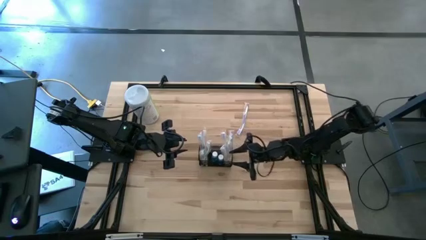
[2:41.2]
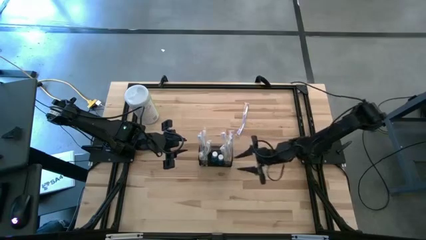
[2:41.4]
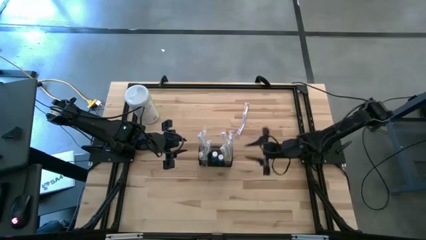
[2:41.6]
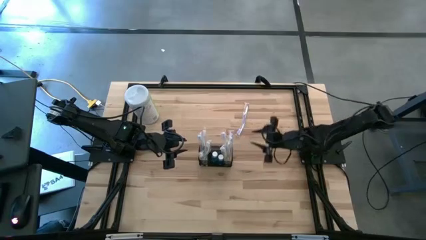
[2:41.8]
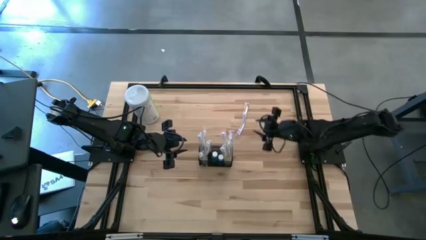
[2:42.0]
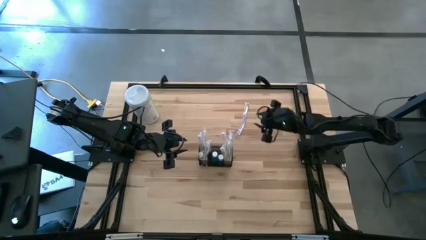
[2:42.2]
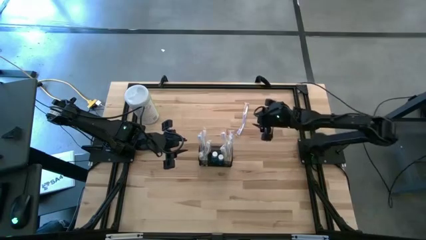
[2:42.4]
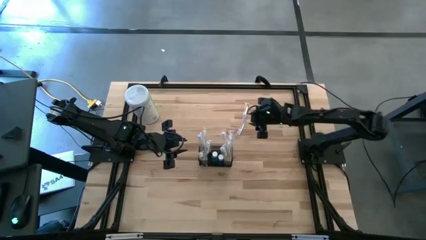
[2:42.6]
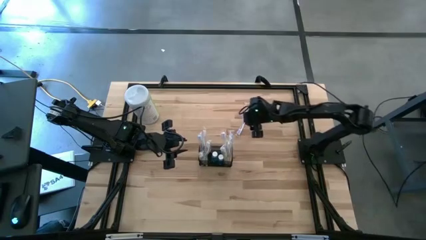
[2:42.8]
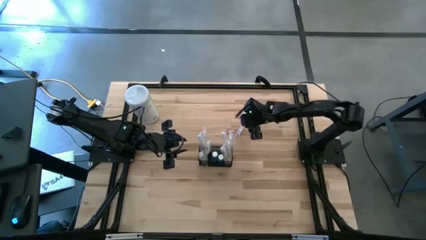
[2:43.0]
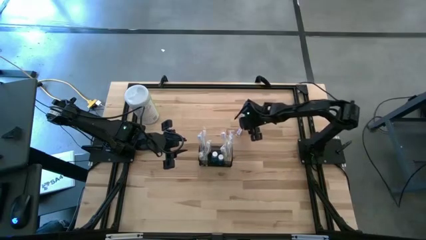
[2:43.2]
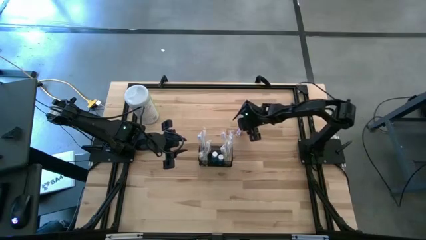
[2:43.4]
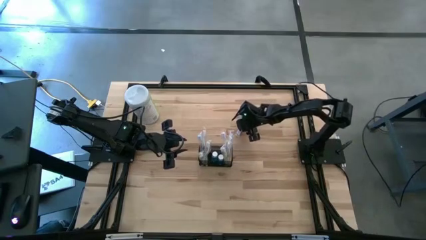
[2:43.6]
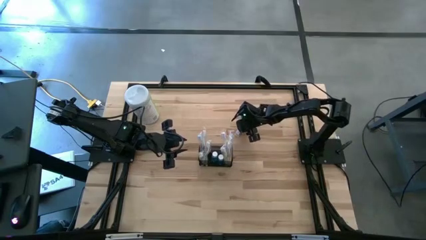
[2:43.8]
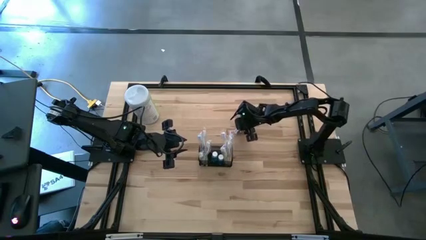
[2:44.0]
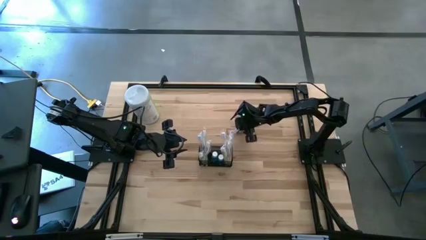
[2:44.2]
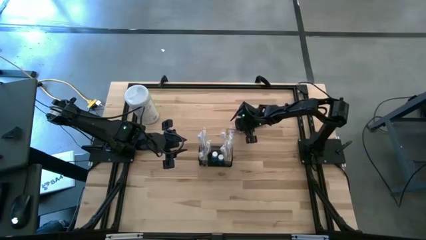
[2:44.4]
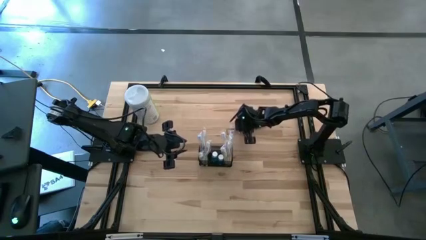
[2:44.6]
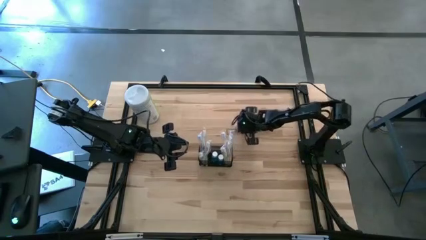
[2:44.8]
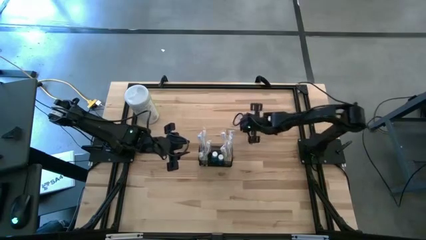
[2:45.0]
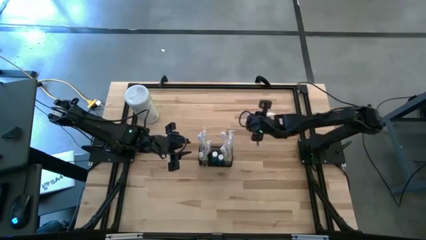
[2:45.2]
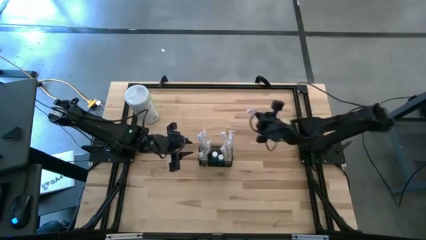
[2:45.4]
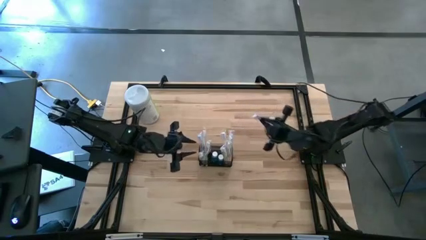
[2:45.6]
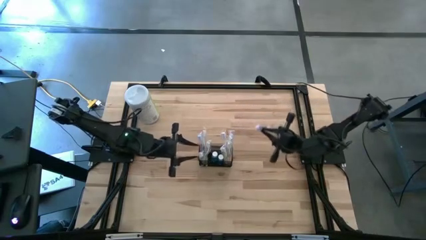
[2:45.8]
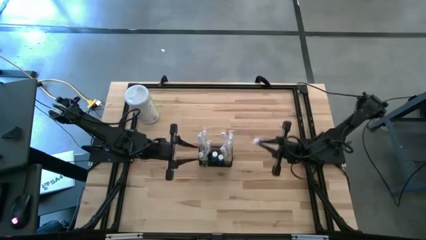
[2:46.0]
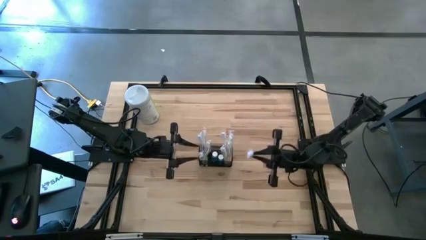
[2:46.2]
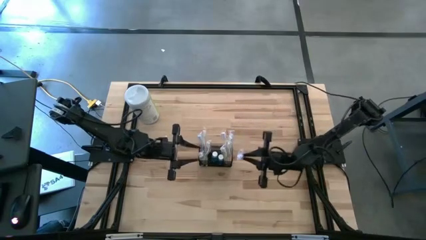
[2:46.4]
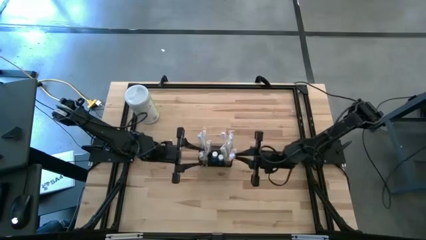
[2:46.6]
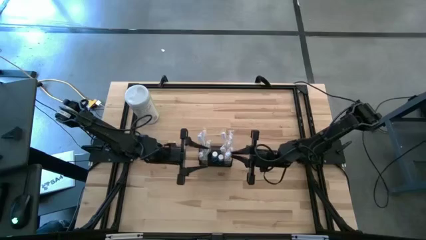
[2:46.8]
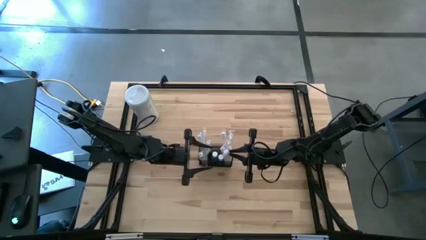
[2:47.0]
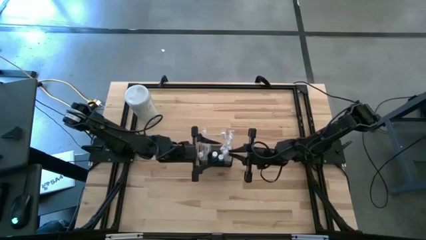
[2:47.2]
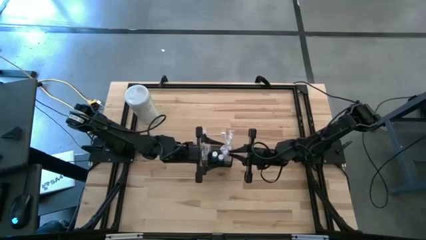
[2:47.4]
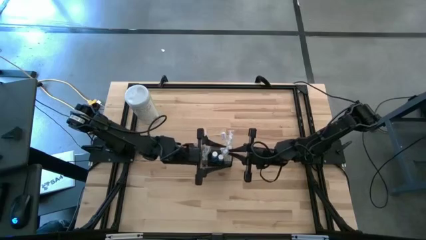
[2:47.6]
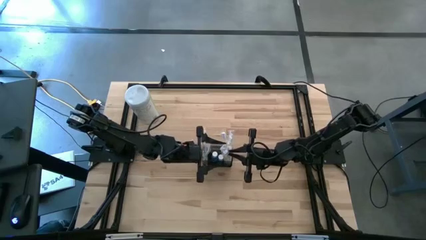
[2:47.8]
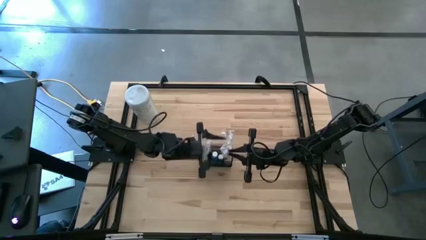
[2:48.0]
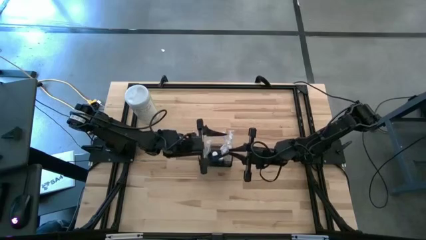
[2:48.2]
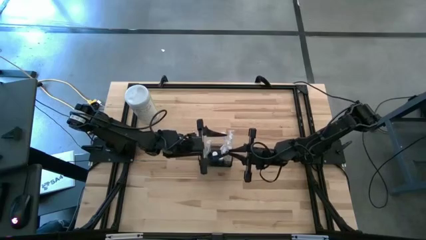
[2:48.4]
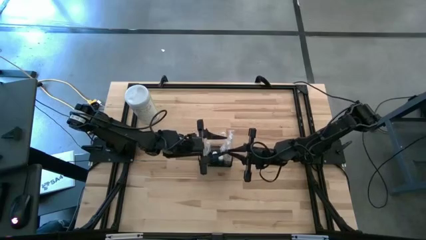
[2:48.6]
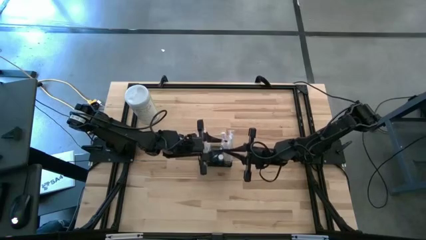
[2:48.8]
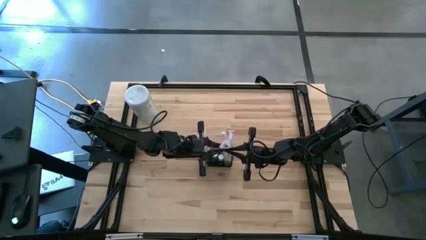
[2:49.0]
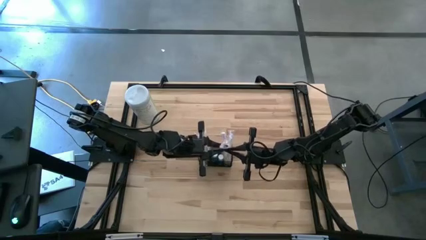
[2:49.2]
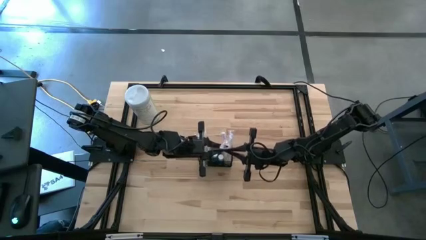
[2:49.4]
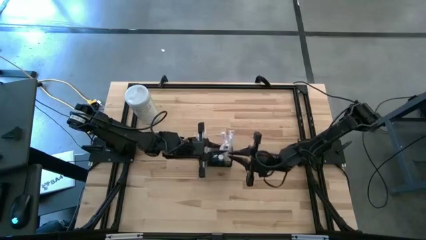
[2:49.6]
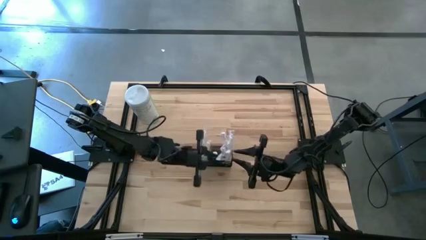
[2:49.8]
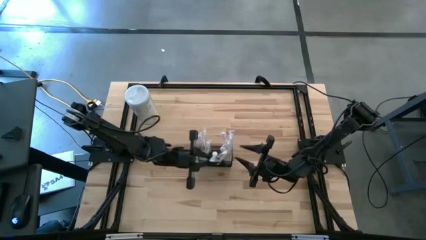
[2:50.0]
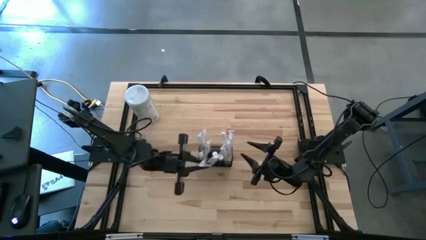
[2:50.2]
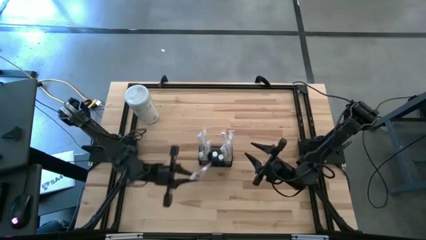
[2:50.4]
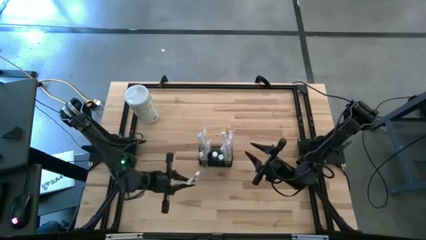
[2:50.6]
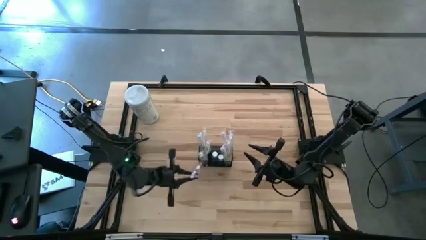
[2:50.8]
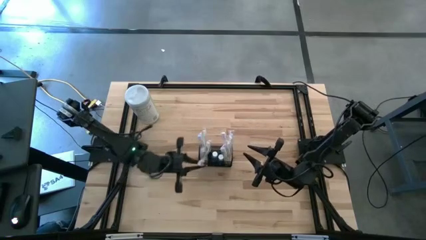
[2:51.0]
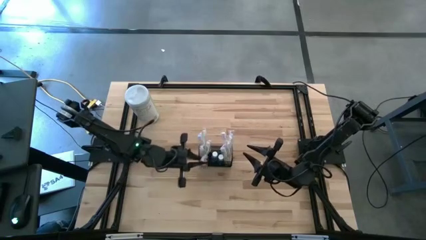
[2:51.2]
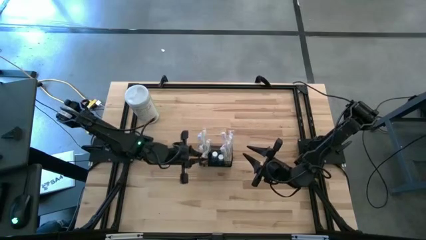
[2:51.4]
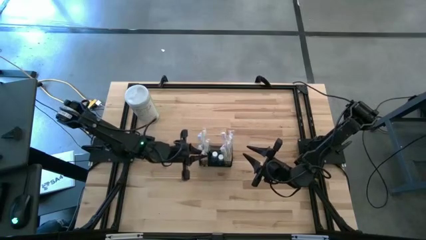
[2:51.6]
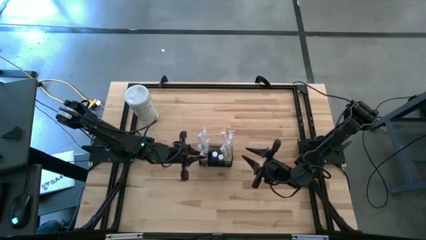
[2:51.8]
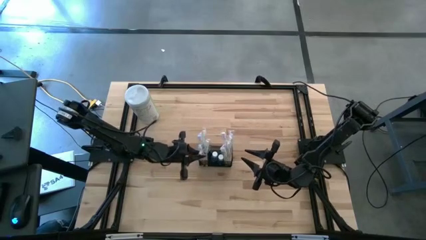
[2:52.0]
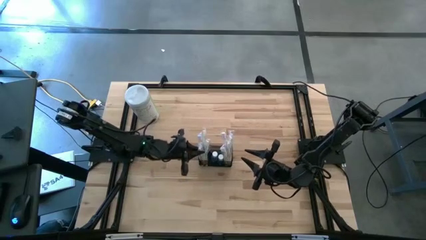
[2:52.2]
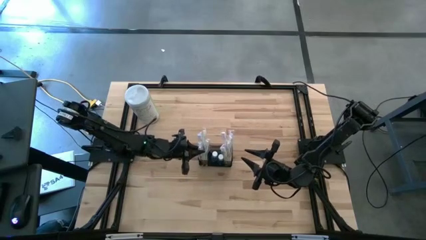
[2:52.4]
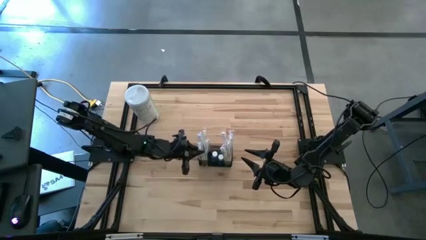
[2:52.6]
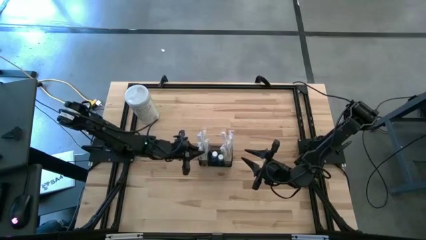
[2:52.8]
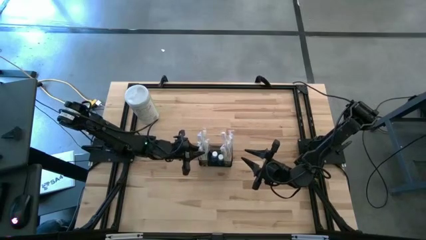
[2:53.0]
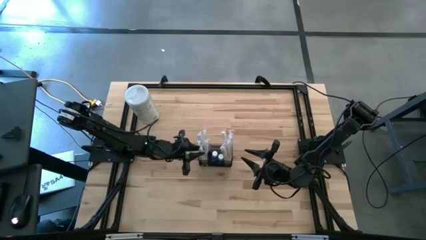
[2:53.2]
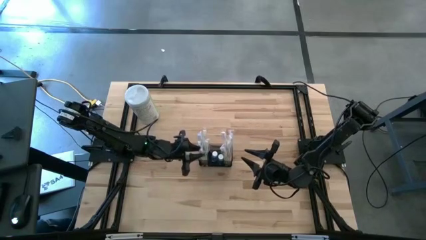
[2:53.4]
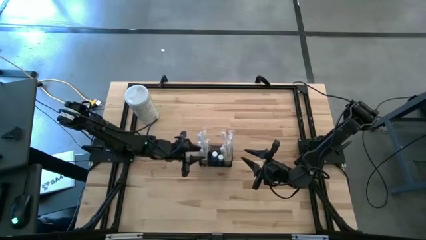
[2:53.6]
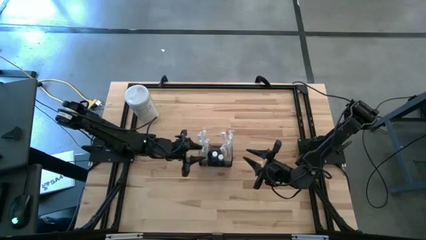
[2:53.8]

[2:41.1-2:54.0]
Task: Pick & Place toothbrushing station
Put the purple toothbrush into the black mesh

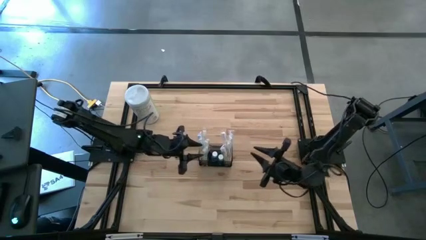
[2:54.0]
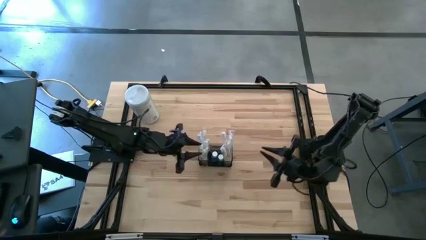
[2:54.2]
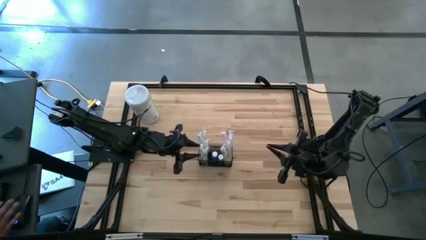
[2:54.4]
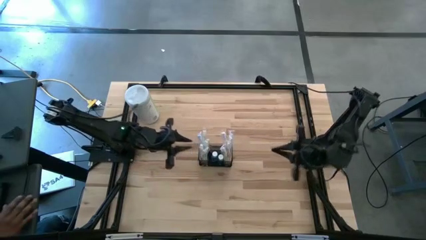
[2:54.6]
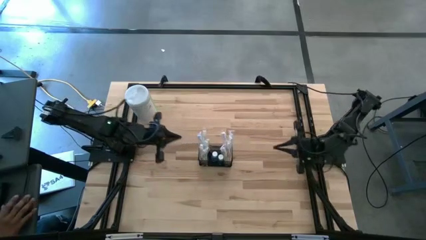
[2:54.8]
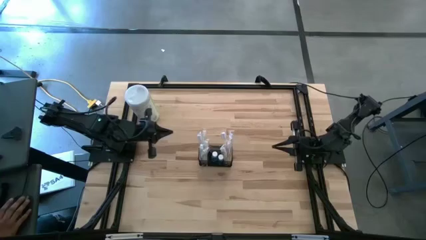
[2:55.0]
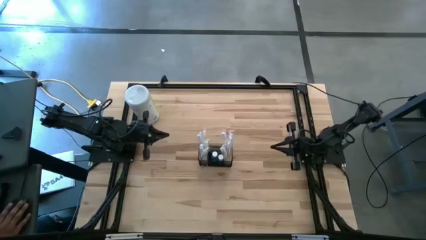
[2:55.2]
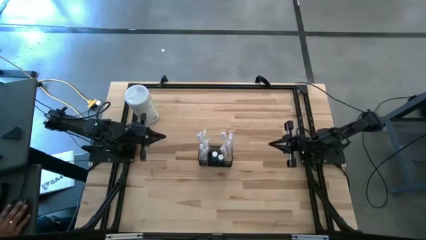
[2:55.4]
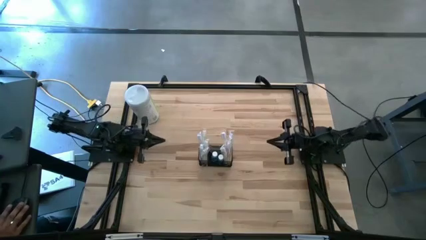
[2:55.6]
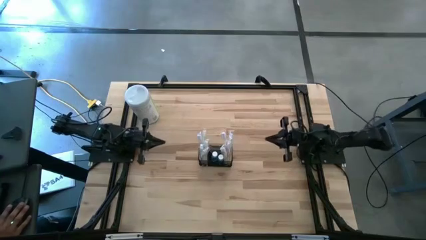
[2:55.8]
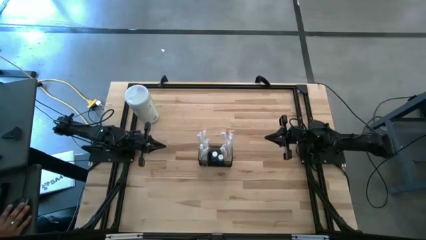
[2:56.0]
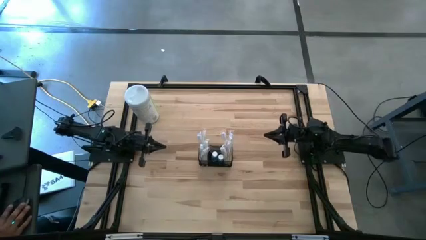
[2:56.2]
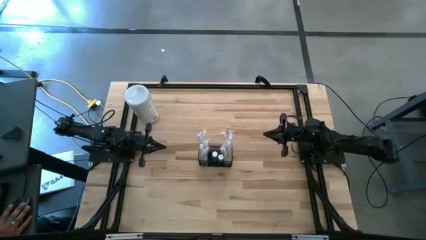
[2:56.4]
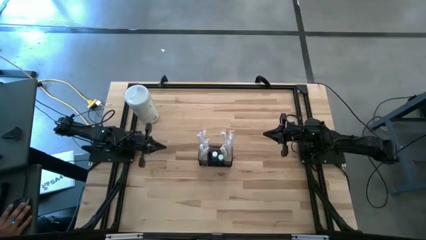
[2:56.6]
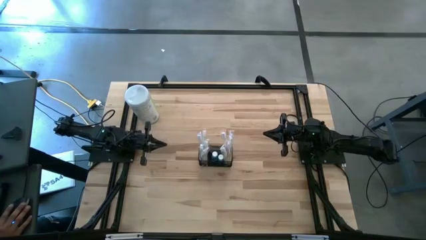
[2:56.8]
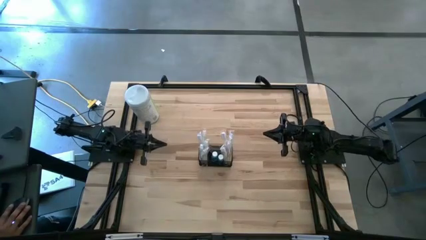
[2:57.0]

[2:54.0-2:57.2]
Return to Home Position
